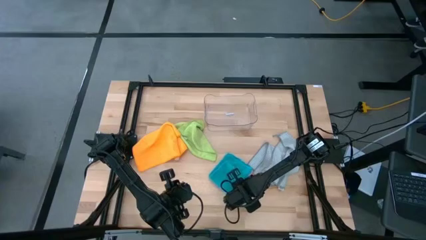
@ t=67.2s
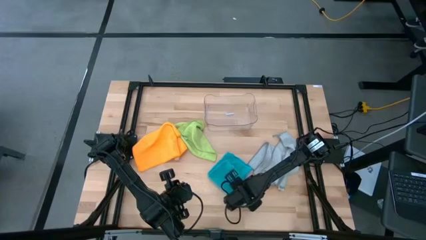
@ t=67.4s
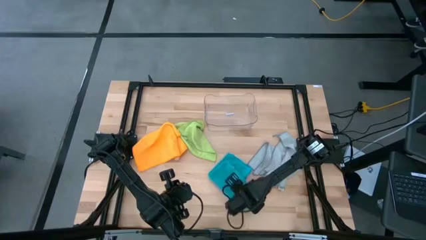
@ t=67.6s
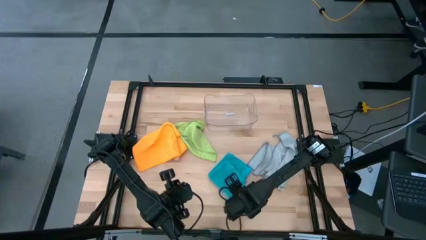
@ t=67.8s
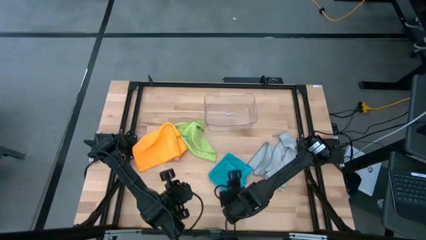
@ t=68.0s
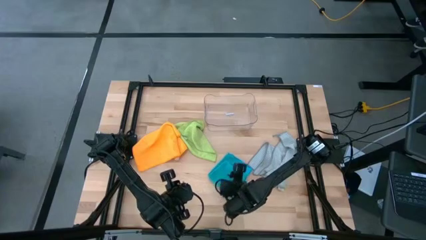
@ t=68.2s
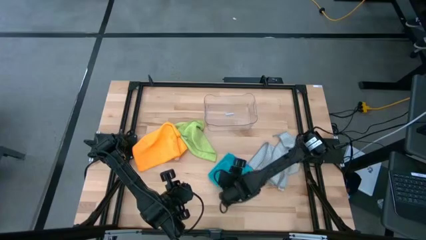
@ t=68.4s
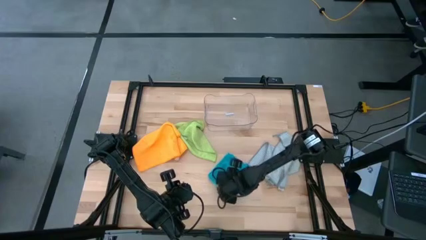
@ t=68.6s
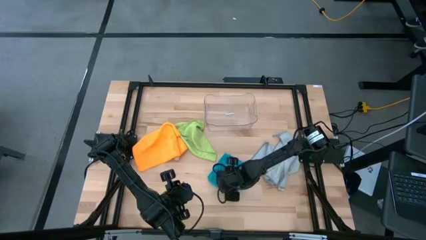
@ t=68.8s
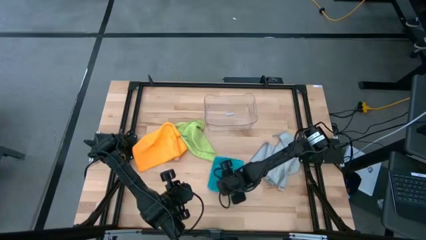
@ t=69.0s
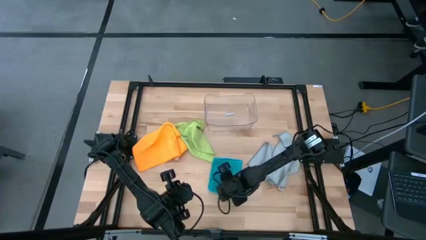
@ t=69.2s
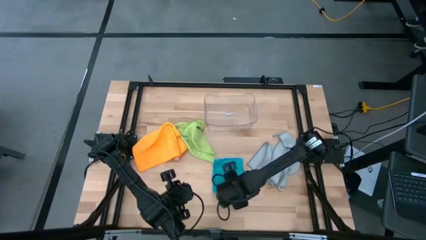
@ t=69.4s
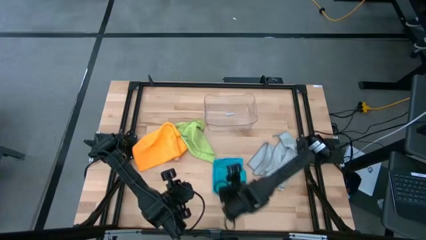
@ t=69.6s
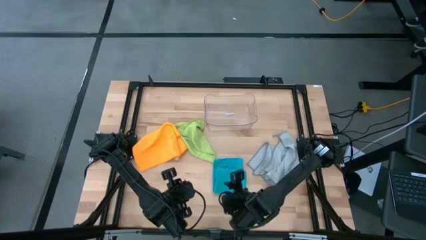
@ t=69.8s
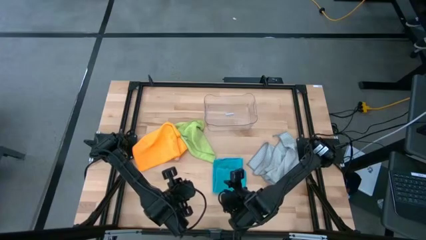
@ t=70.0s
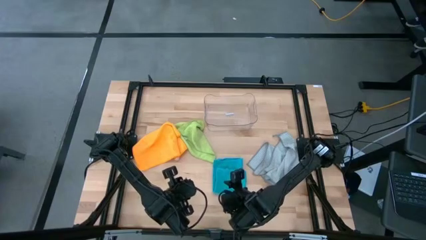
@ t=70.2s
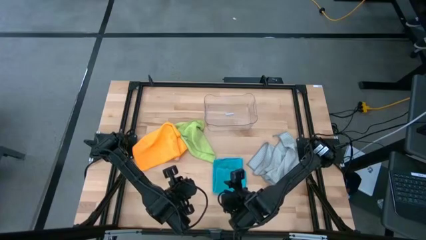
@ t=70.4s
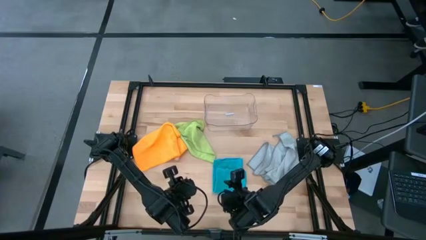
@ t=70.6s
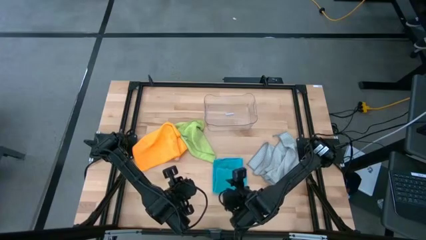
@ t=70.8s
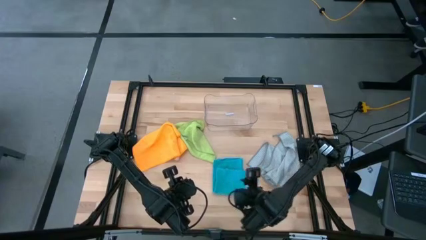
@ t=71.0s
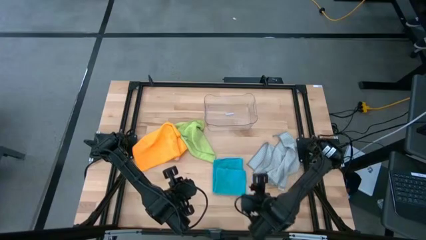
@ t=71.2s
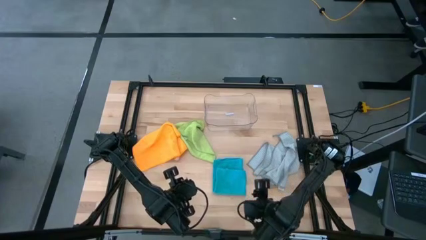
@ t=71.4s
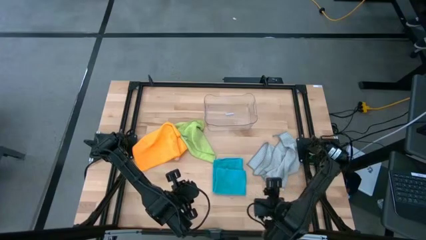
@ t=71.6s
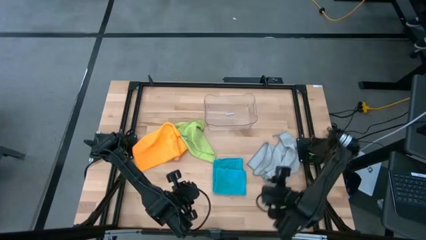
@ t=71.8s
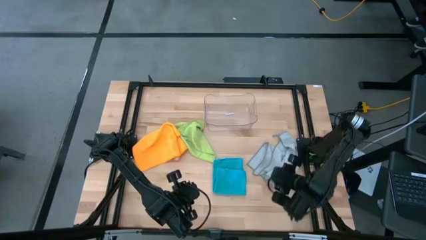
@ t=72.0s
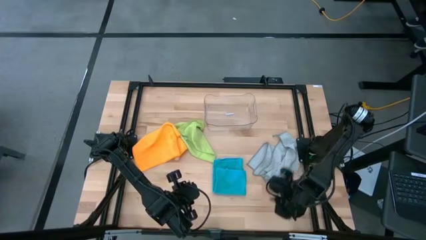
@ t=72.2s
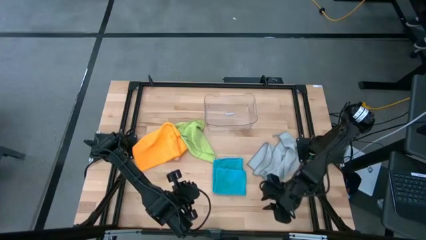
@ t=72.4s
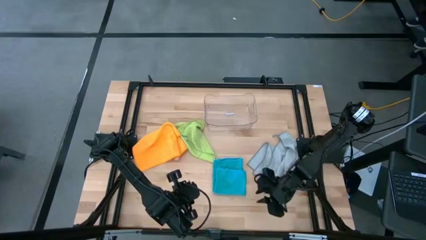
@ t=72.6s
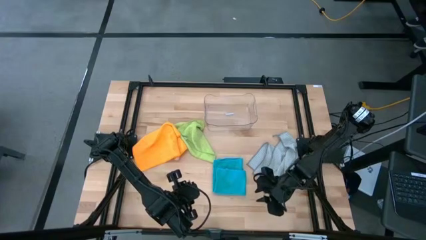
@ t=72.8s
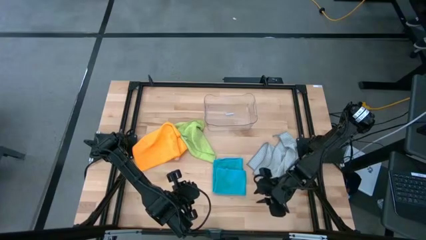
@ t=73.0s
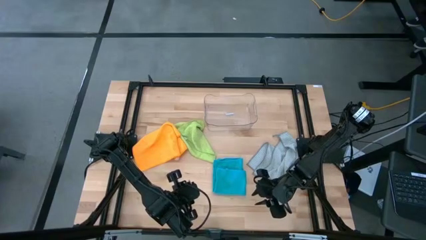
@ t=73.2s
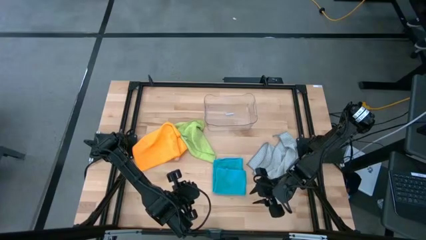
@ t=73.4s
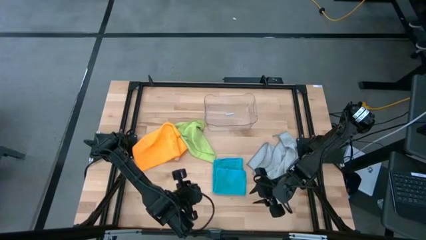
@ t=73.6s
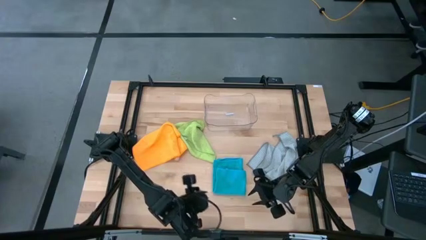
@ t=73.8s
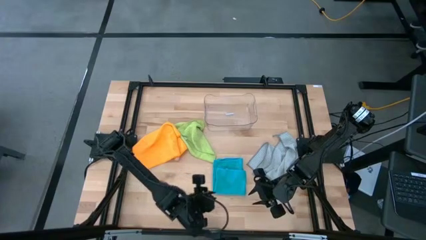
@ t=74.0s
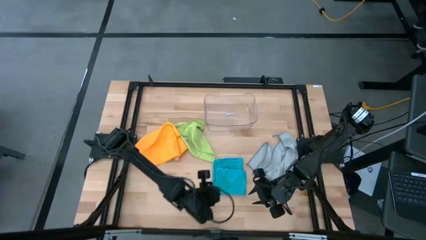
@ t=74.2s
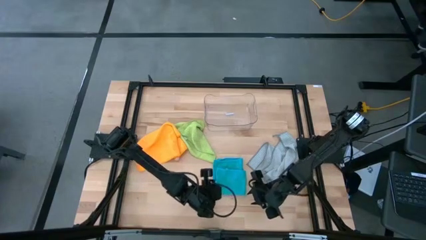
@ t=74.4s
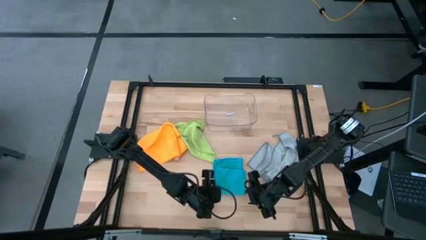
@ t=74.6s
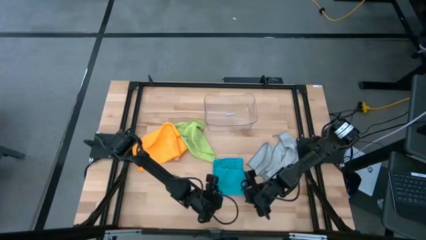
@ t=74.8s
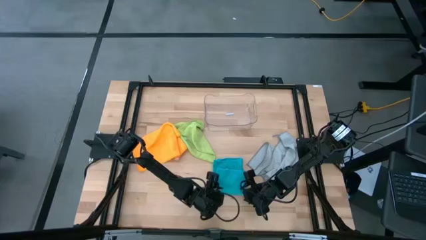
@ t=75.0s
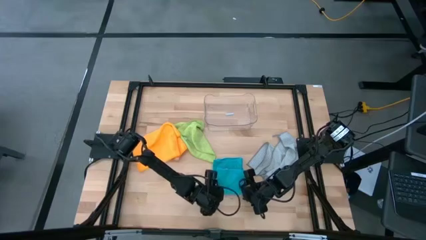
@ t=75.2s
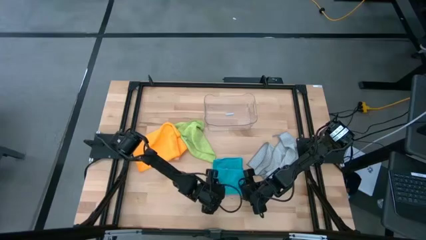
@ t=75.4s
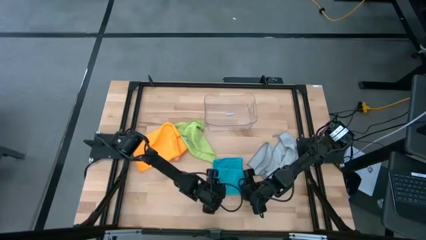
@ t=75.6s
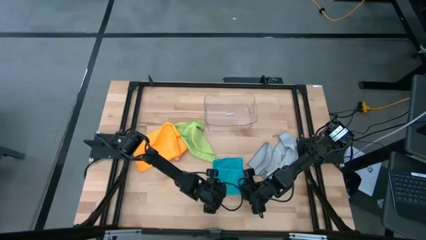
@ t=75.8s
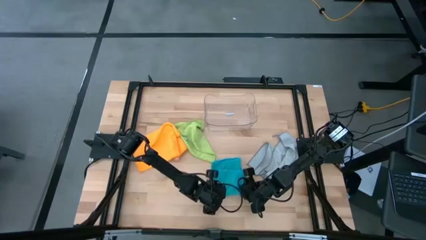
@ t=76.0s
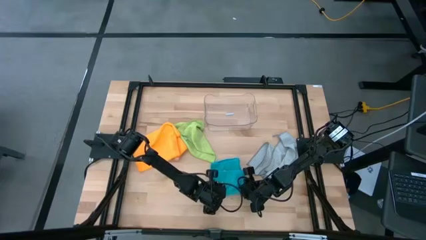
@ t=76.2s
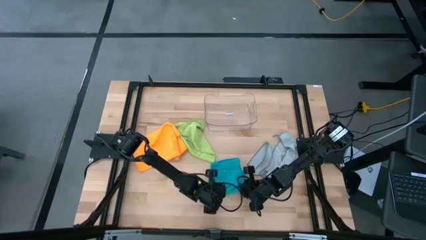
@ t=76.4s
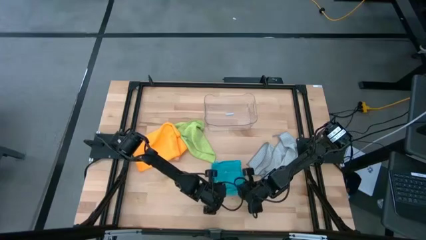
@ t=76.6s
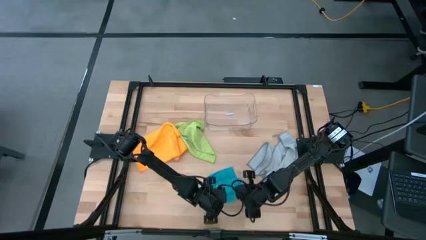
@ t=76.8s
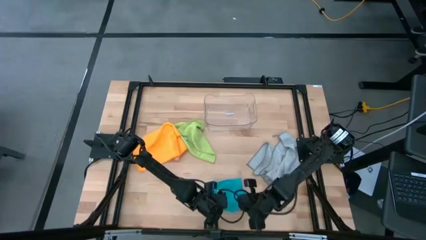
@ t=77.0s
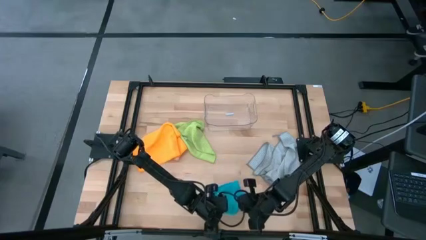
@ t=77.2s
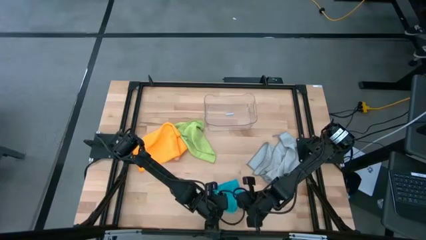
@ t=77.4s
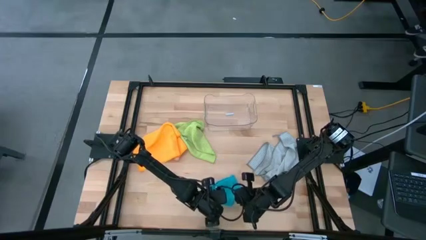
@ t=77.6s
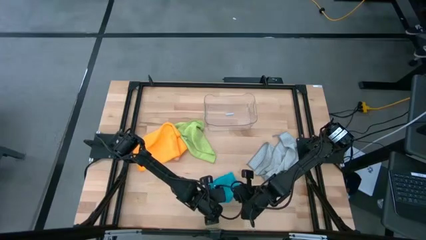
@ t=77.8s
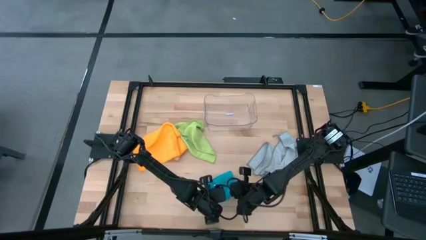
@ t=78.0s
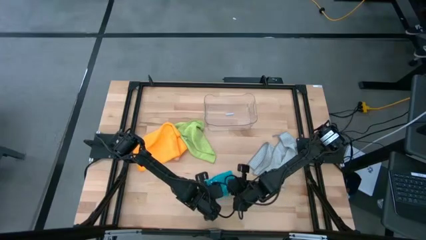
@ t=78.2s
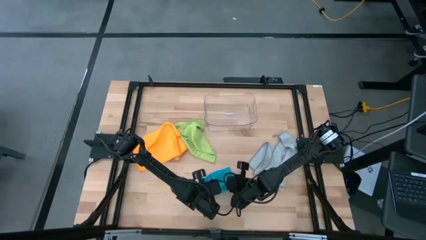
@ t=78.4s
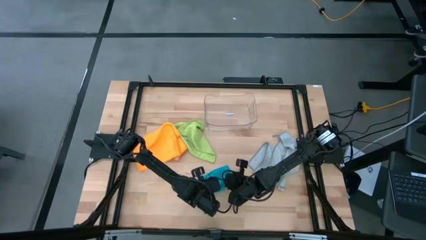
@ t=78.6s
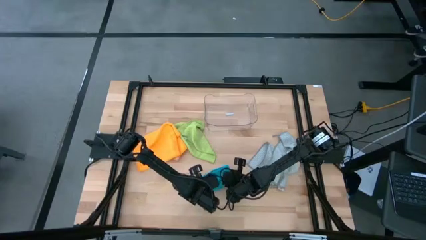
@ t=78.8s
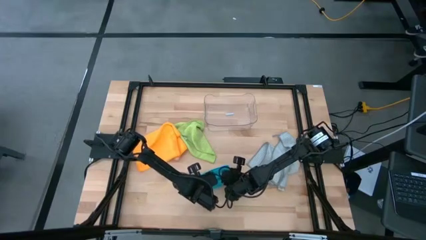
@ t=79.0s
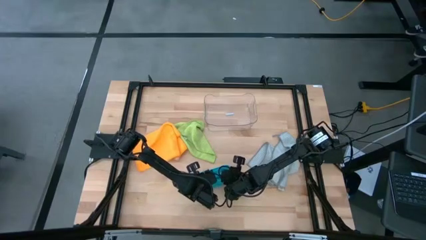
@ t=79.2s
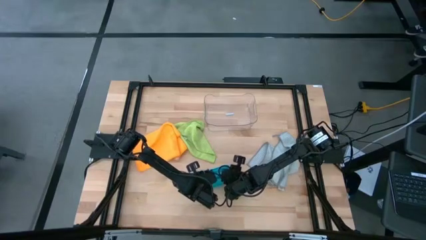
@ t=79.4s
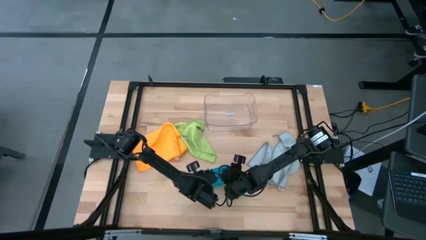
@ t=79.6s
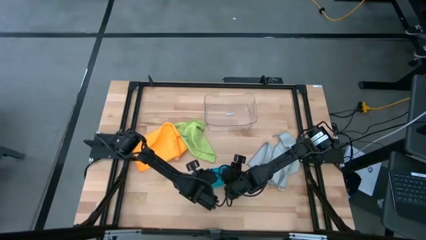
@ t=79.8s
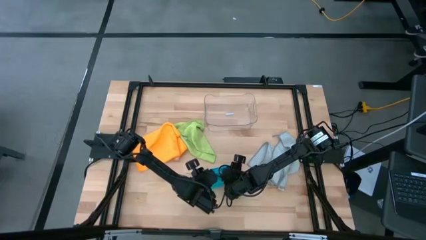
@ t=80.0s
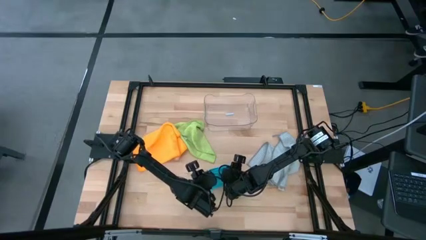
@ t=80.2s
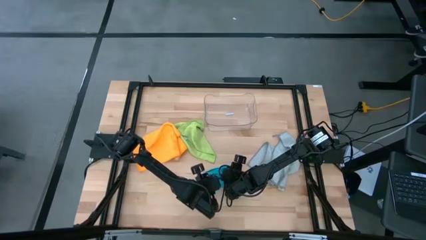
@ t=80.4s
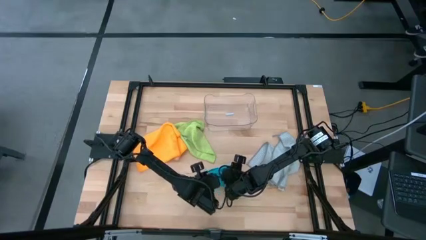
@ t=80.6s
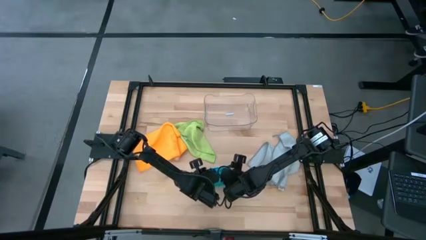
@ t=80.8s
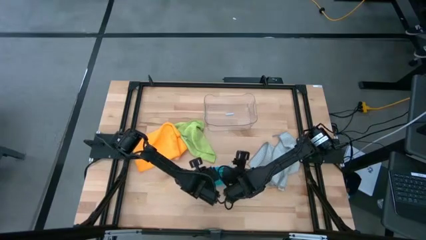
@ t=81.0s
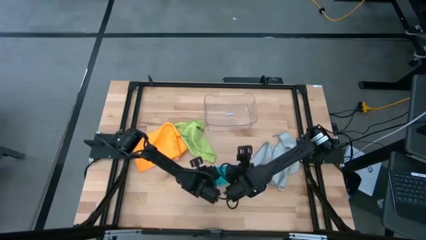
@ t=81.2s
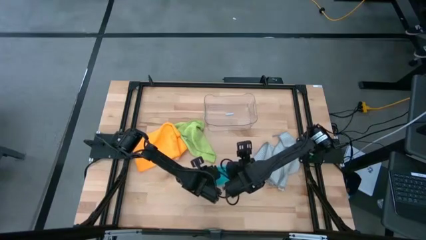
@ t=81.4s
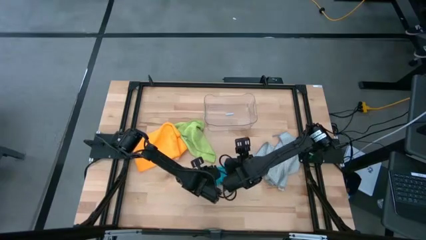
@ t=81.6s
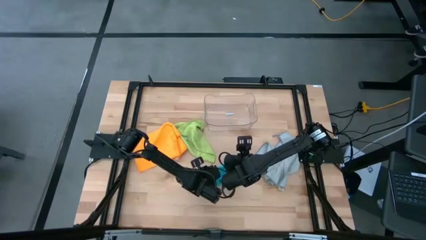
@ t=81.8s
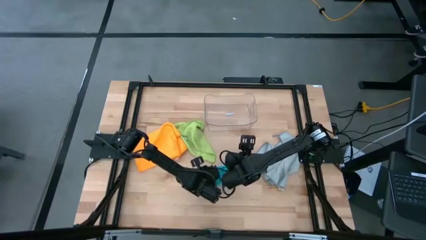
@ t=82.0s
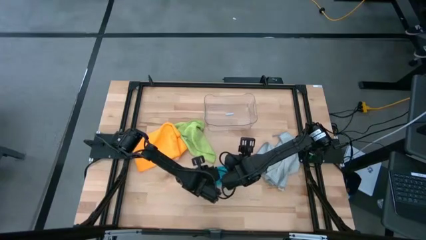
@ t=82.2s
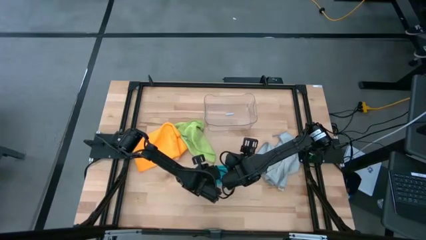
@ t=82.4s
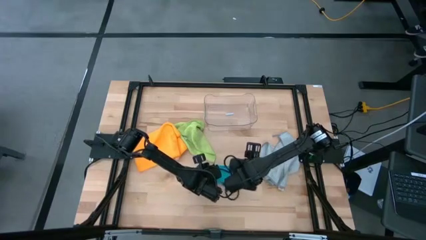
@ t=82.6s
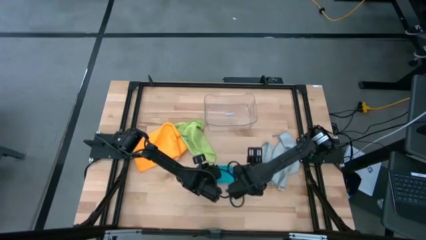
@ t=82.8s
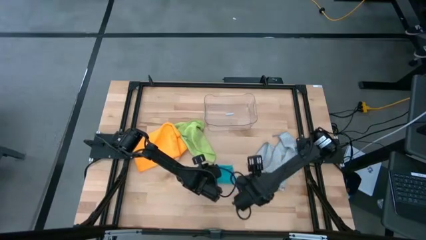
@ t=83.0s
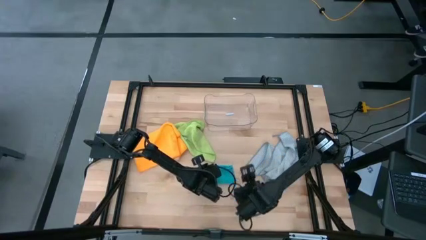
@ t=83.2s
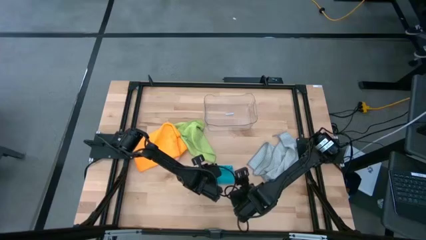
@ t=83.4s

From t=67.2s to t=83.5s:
Task: Fold microfiber towels
Fold the blue towel
